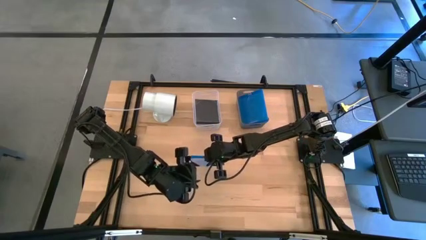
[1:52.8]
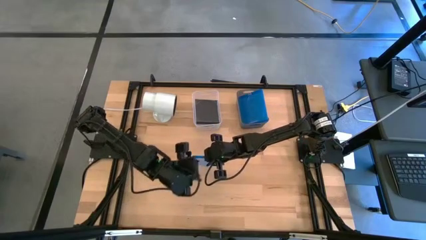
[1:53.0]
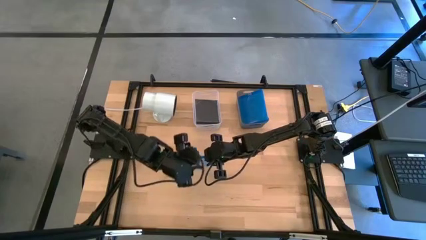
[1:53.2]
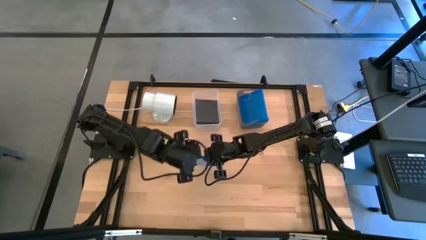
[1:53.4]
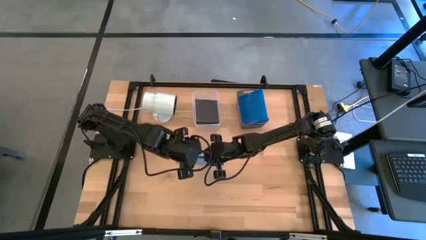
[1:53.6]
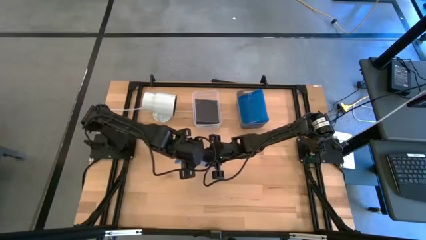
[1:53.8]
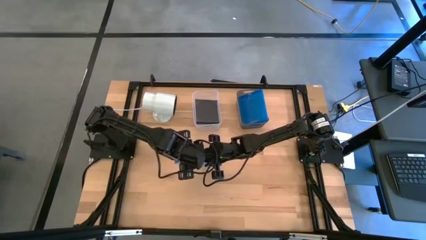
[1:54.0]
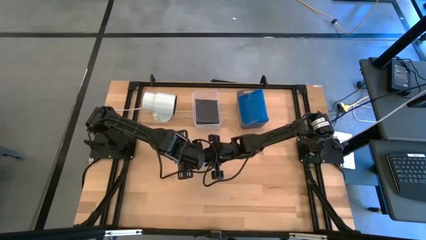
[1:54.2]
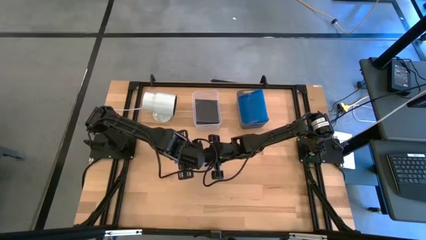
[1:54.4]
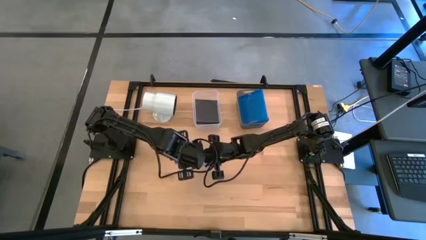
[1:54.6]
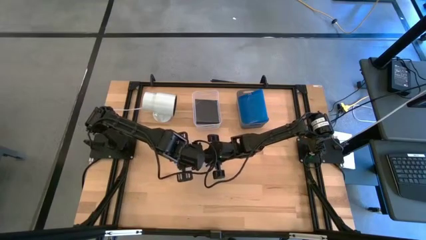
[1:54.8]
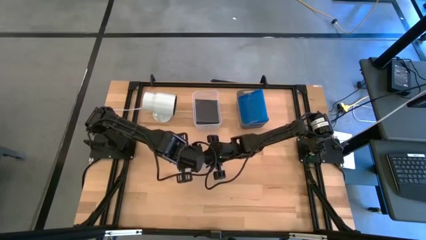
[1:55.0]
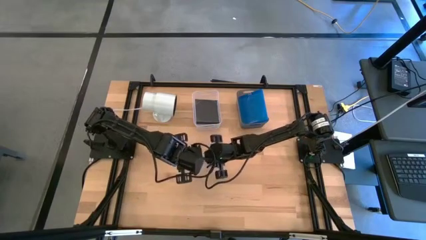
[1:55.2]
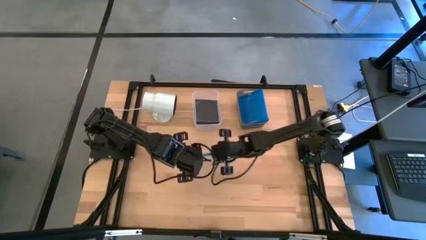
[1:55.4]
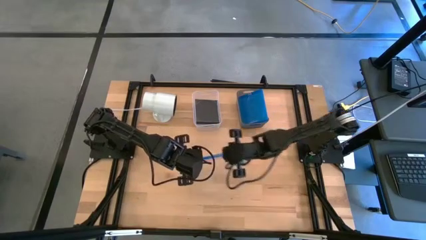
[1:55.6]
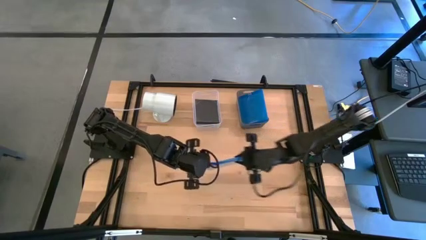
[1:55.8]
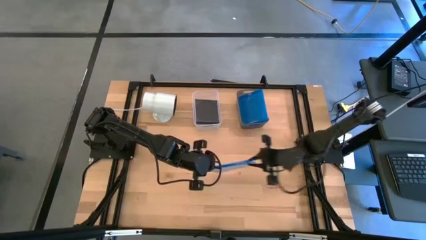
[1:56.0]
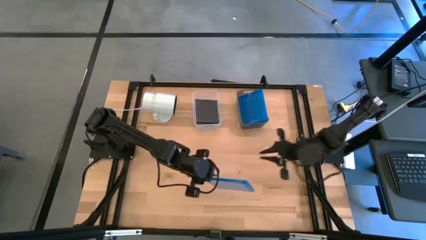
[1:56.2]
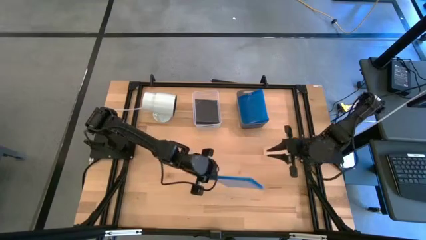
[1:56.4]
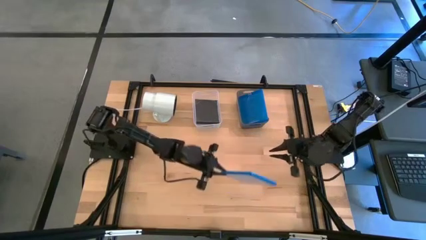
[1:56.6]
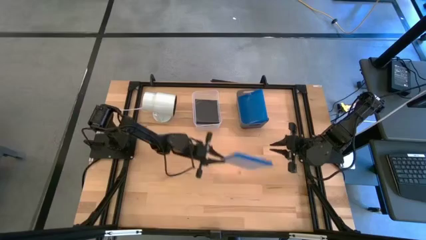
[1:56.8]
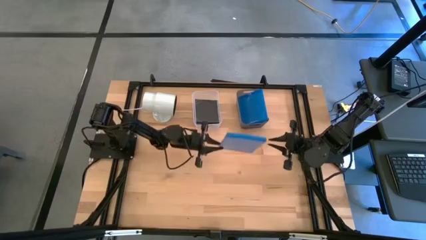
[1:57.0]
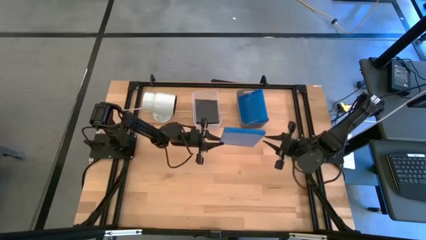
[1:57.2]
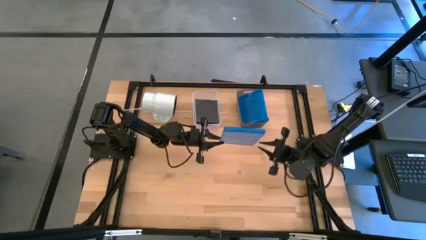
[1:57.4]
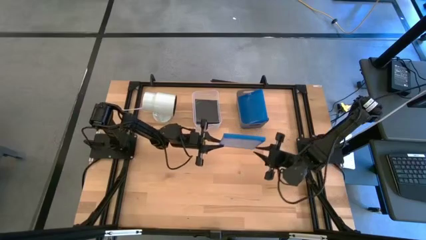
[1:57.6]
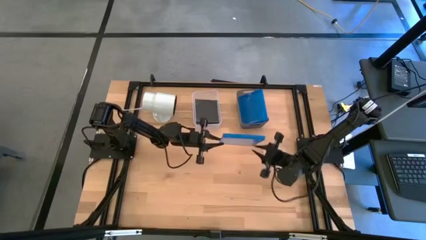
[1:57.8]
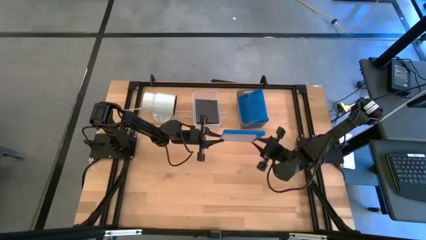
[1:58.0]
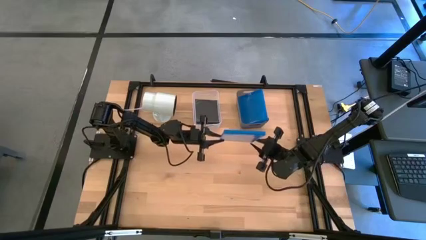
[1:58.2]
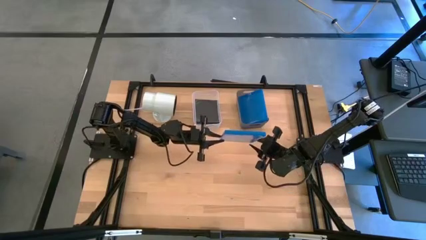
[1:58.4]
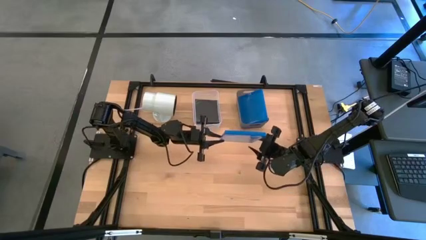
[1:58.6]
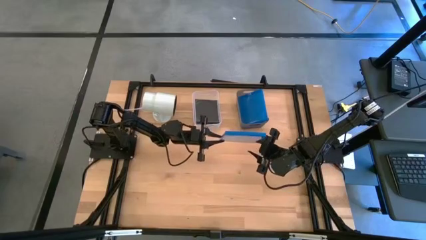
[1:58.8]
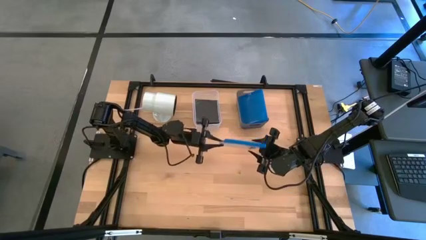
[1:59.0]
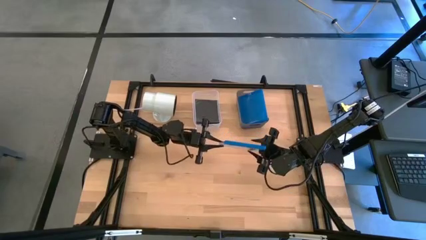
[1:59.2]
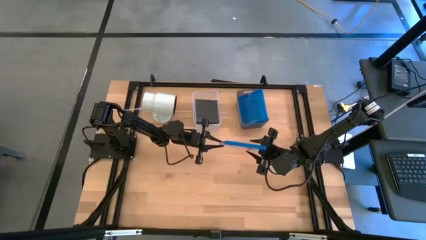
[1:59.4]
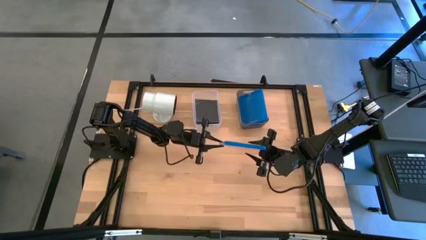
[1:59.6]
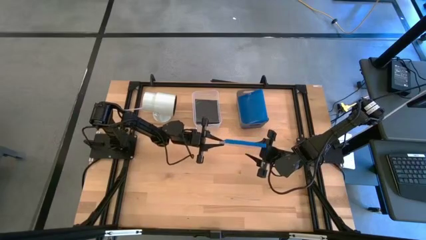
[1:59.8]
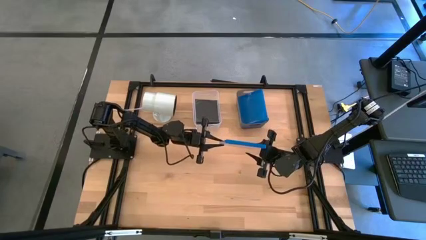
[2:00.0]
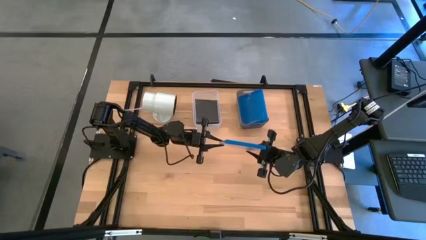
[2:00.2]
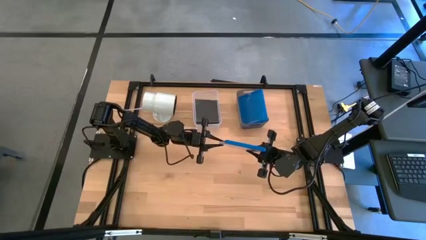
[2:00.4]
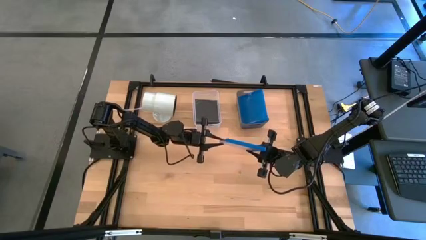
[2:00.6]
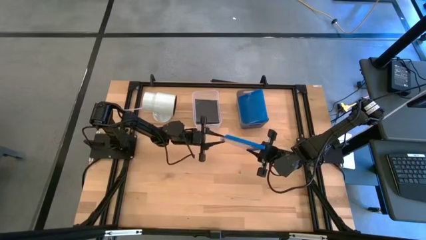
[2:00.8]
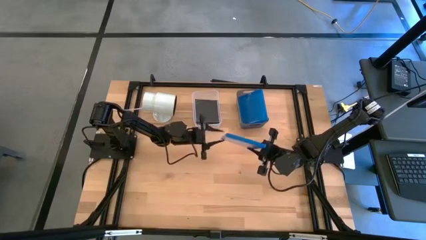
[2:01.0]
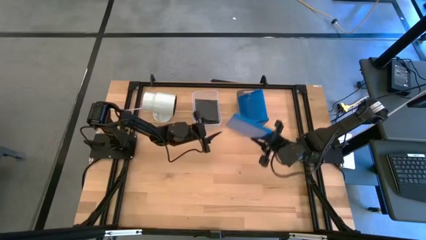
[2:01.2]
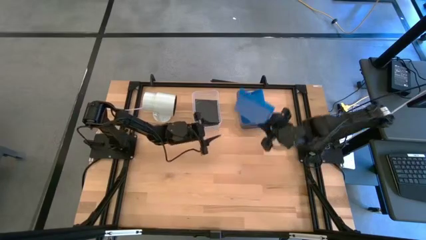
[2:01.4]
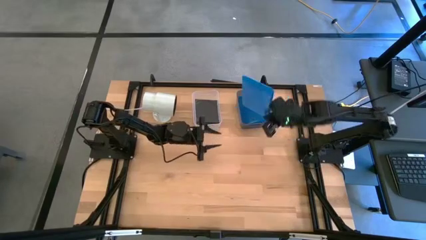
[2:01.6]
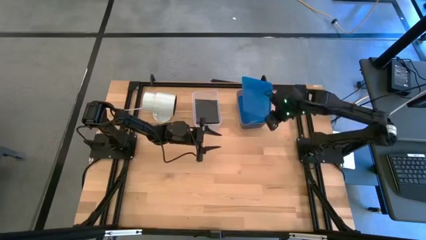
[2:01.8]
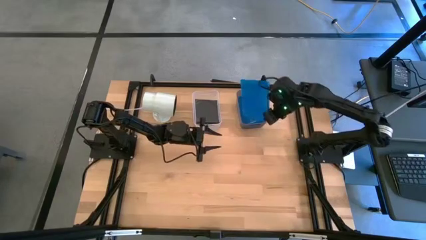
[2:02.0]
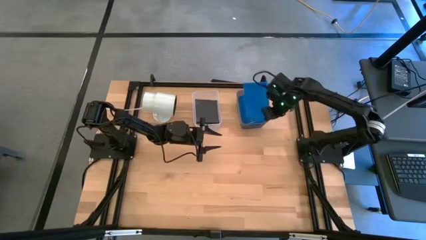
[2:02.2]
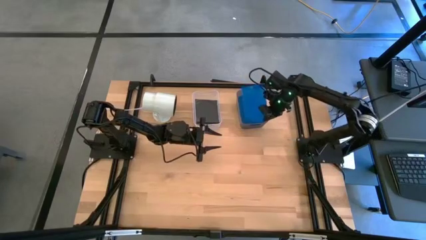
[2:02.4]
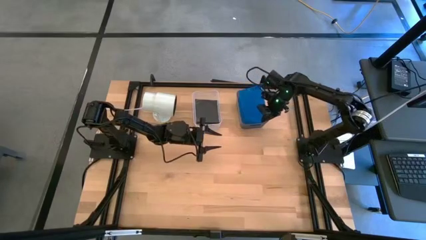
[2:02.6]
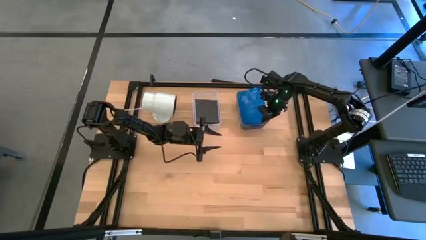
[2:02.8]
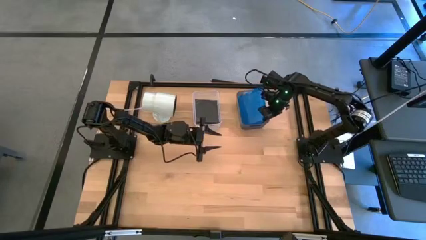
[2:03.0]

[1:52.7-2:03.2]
Task: Pick & place jewel cases by type
Put the blue cd case into the gray bin

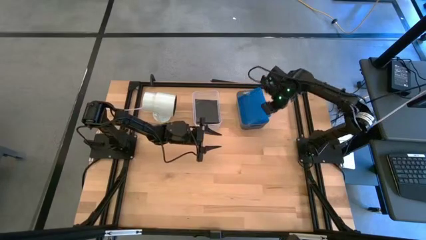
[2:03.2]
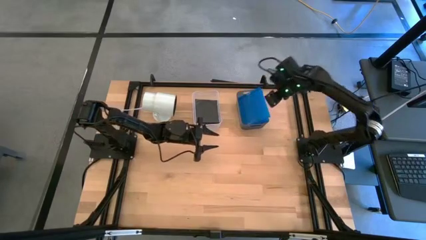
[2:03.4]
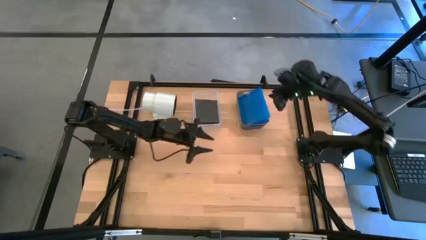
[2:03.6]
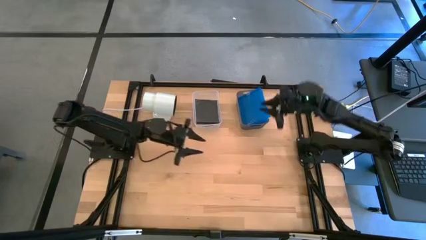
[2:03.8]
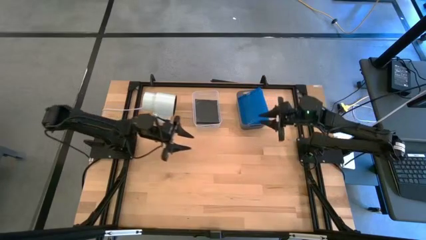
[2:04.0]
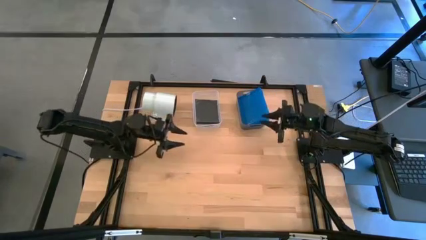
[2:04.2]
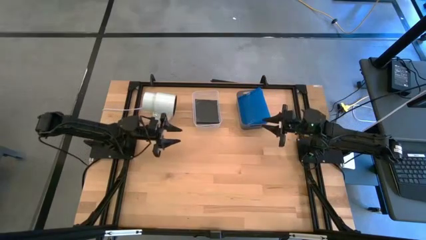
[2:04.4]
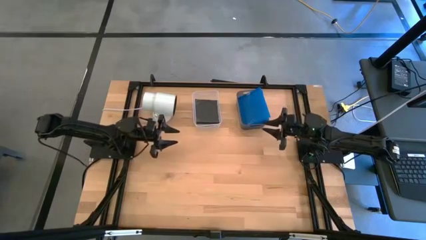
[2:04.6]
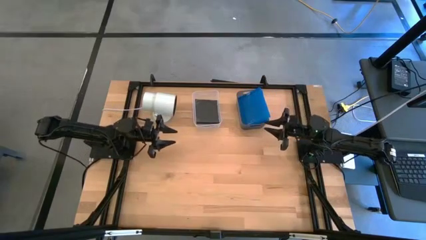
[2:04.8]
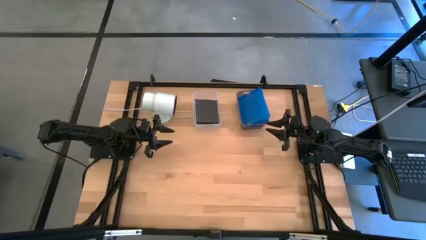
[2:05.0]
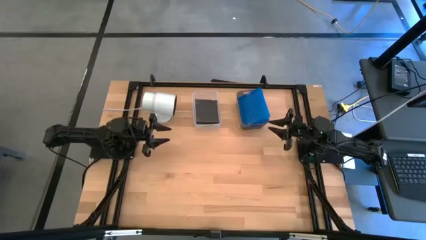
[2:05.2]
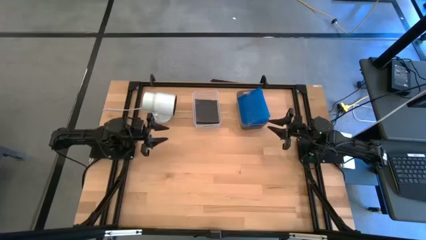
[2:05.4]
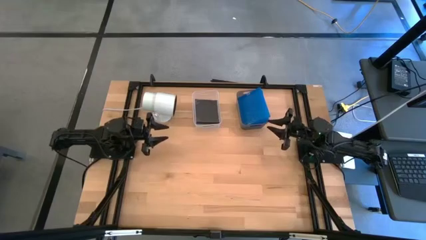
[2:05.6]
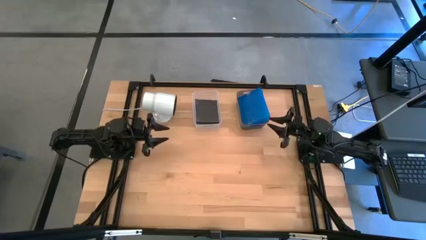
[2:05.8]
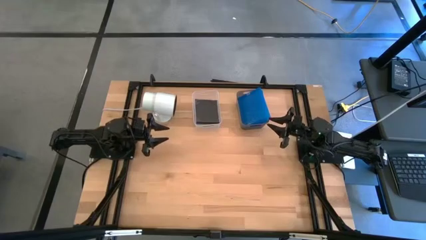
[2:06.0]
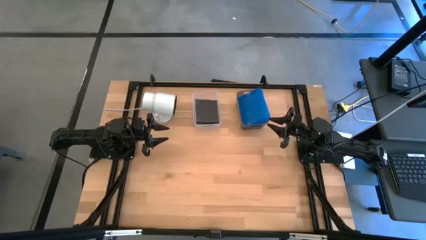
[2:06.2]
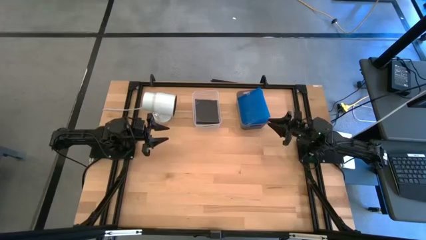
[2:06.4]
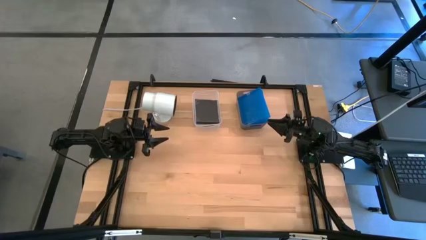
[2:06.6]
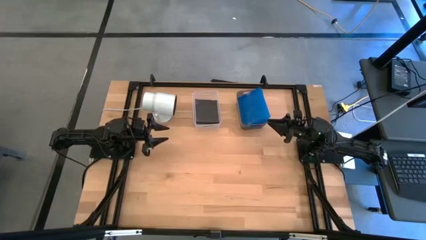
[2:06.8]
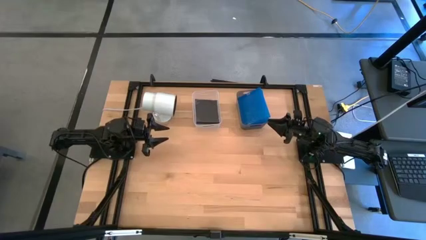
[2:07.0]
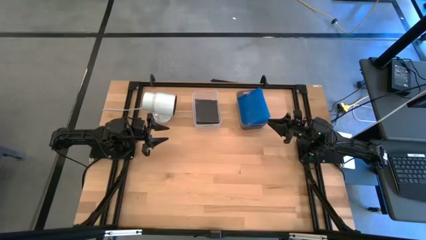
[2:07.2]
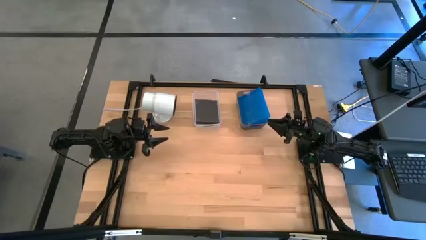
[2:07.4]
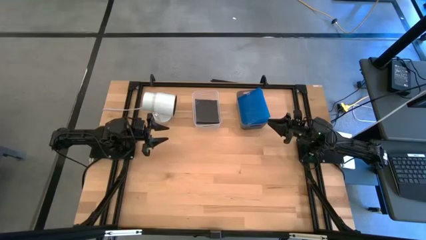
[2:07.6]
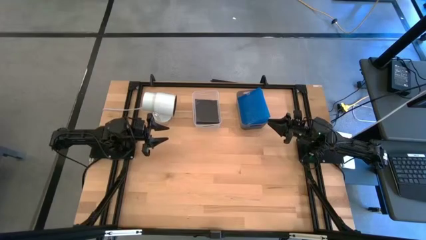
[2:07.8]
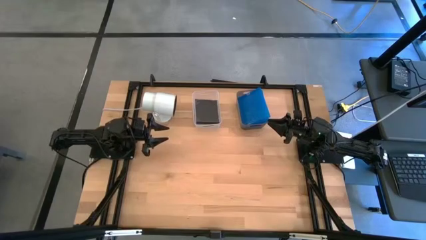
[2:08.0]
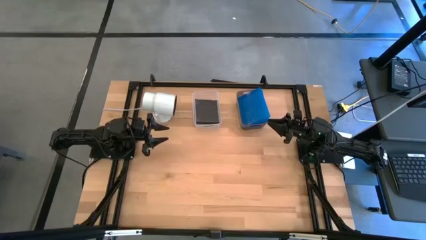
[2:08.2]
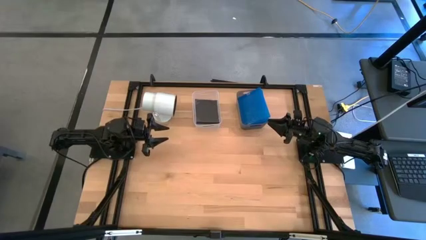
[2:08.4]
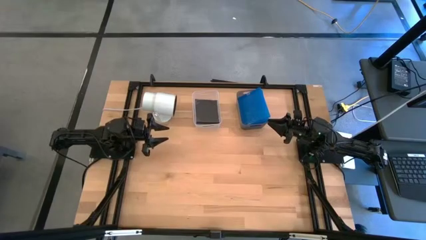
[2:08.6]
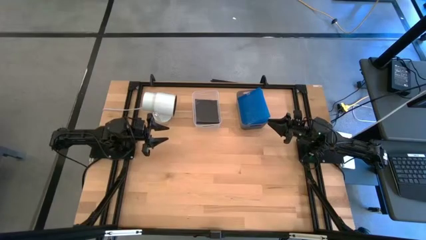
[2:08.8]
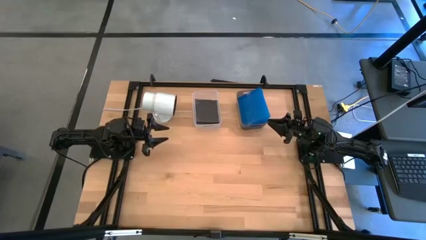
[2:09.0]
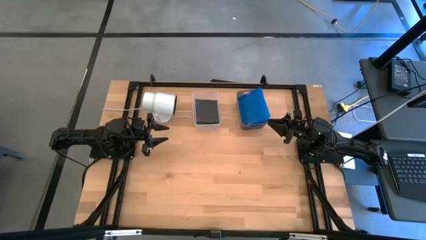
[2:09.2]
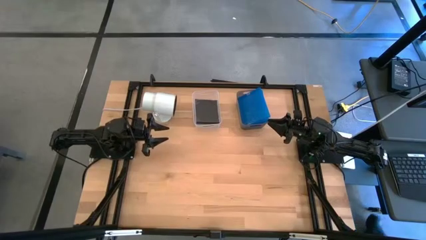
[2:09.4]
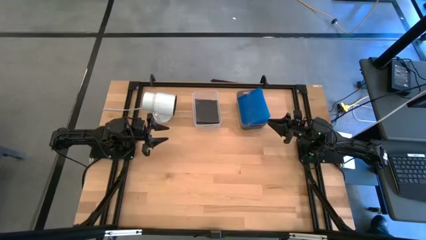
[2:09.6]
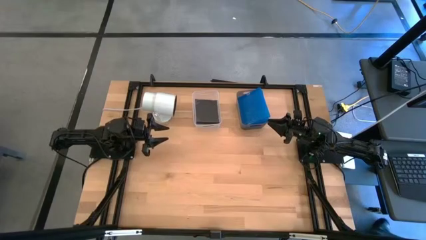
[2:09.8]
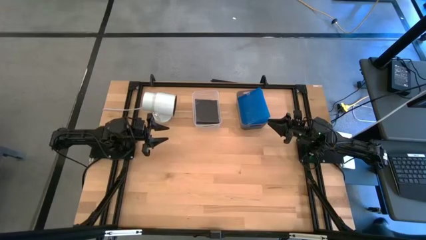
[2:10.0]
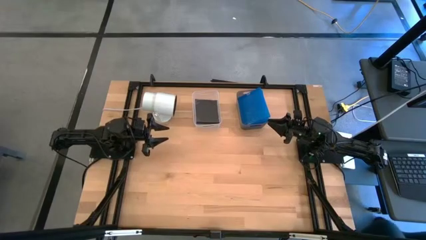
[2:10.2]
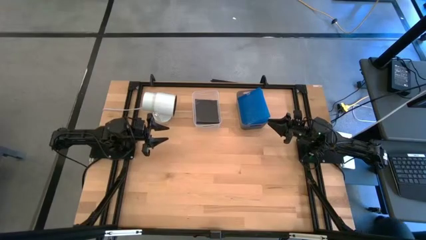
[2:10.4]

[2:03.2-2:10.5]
Return to Home Position

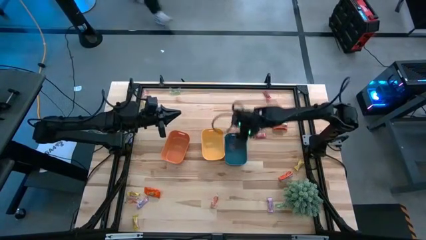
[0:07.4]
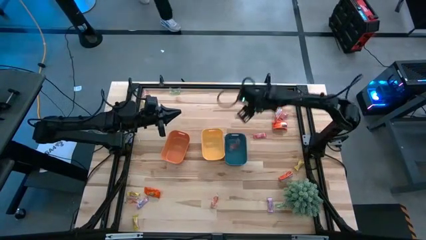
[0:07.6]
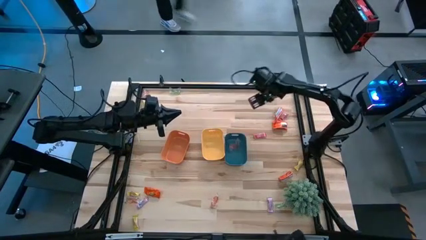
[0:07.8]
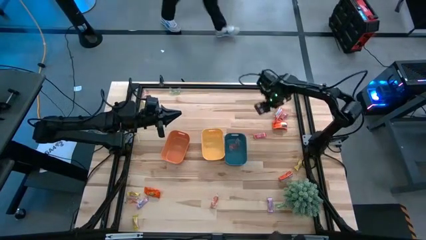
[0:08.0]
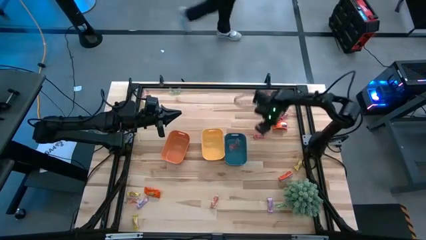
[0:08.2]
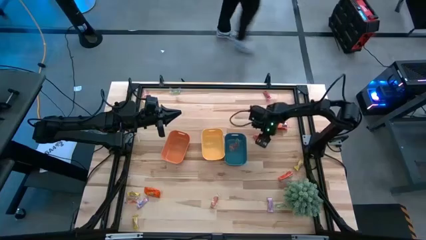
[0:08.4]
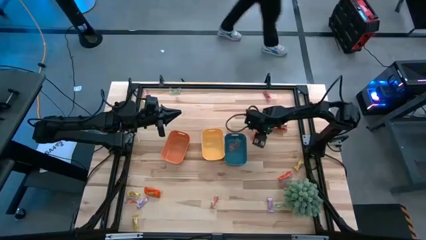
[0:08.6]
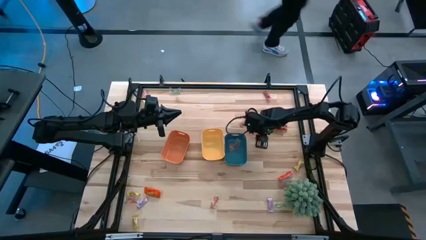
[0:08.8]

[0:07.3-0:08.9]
Task: Sort candy
Put the red candy into the yellow bin
